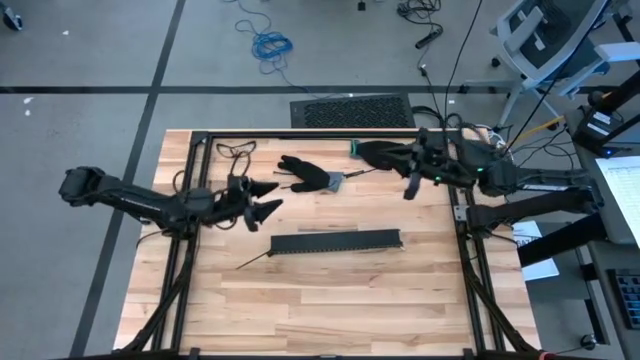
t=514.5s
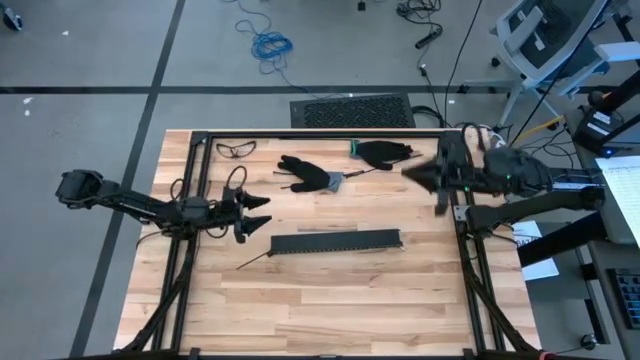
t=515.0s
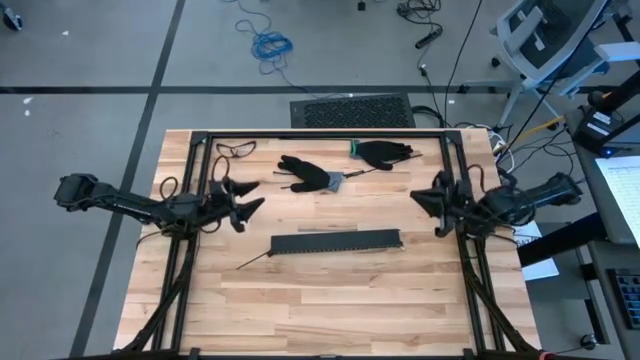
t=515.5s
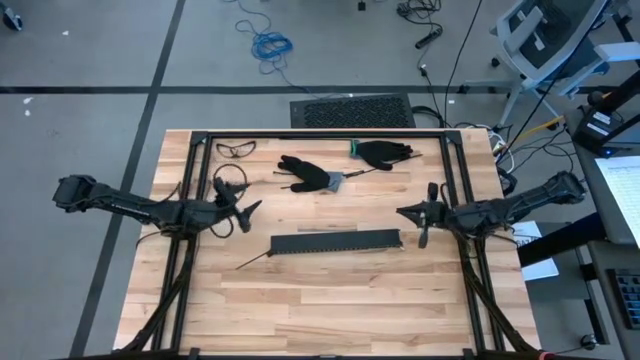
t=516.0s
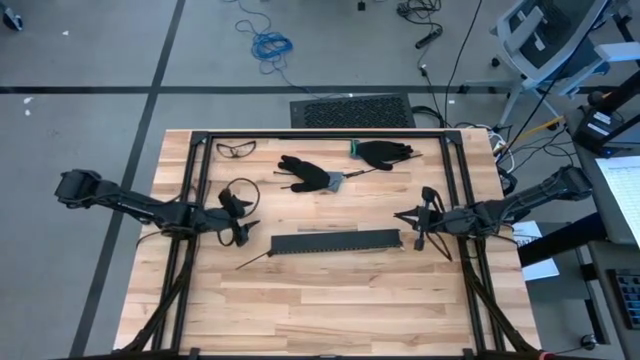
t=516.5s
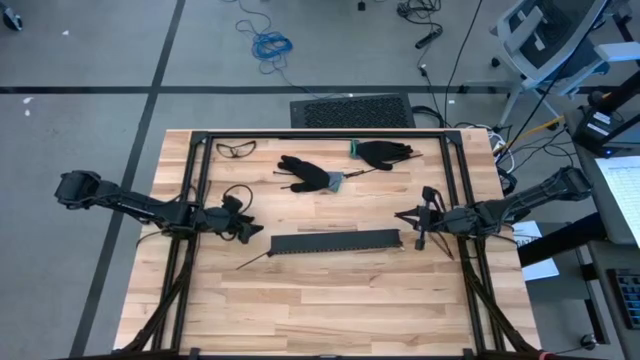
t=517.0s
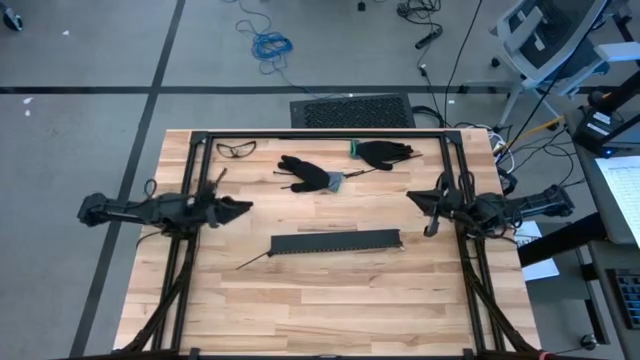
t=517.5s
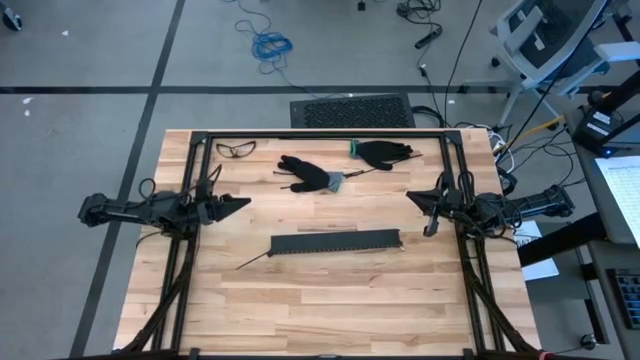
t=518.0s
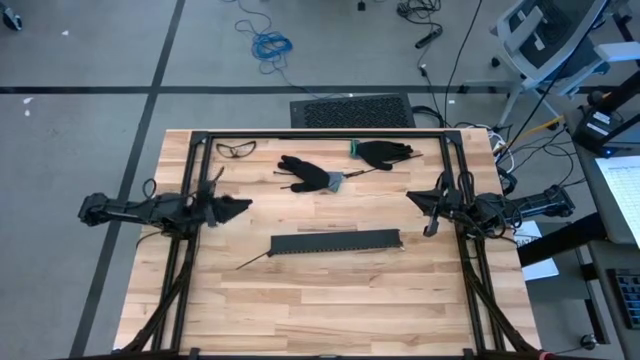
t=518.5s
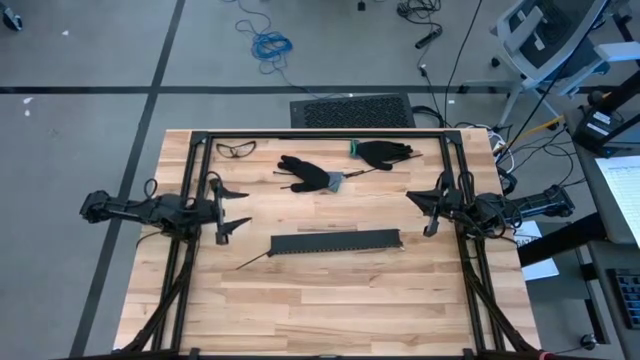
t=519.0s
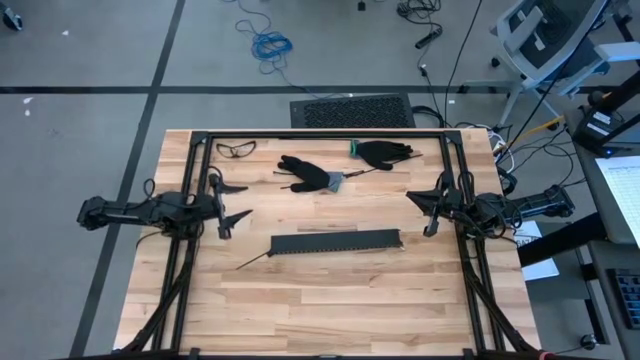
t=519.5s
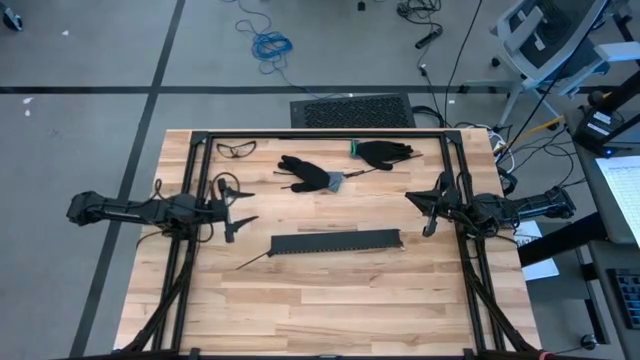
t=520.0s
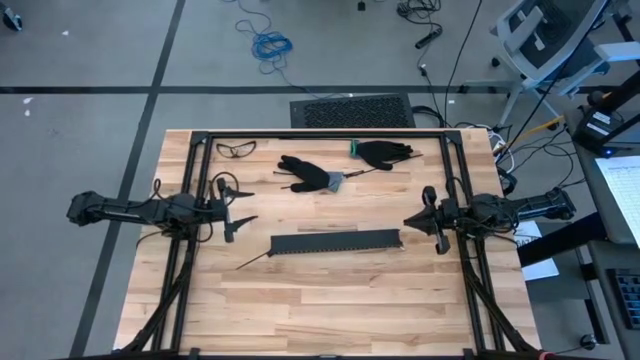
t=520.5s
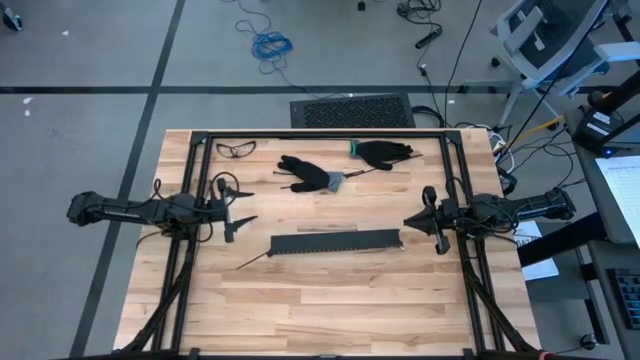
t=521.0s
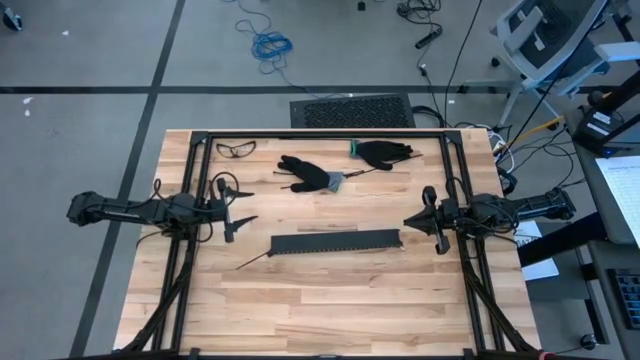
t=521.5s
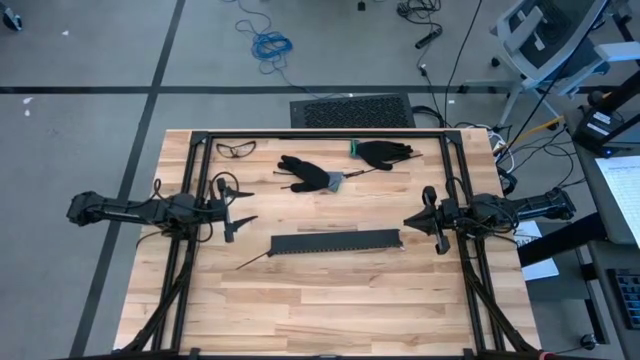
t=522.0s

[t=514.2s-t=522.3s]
Task: Ziptie cables
Return to Home Position

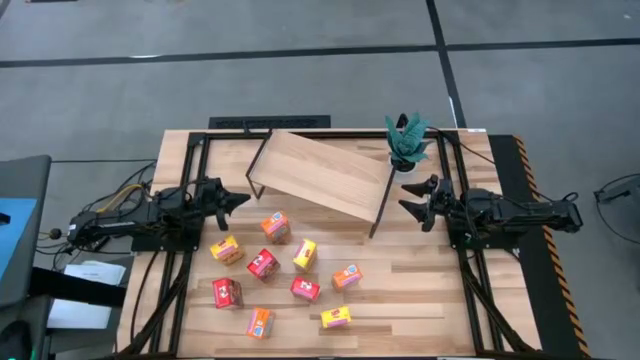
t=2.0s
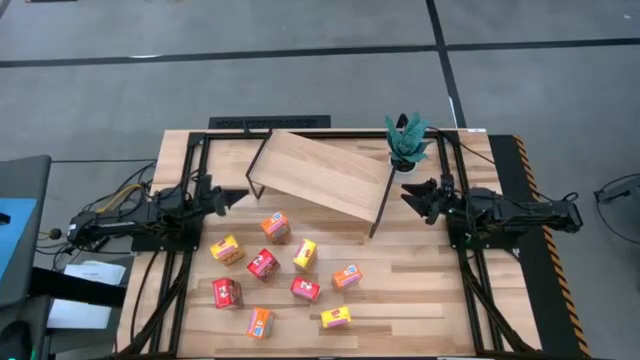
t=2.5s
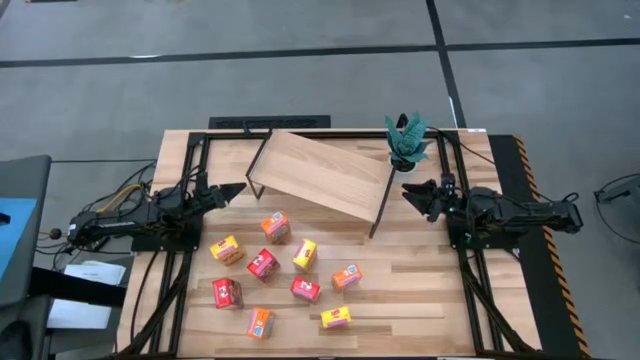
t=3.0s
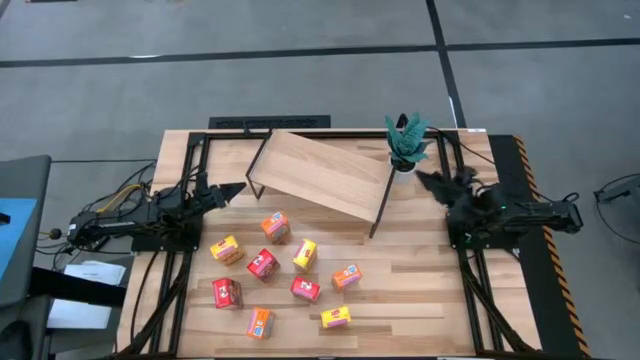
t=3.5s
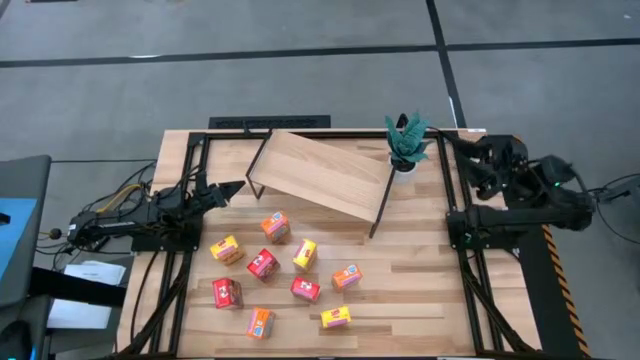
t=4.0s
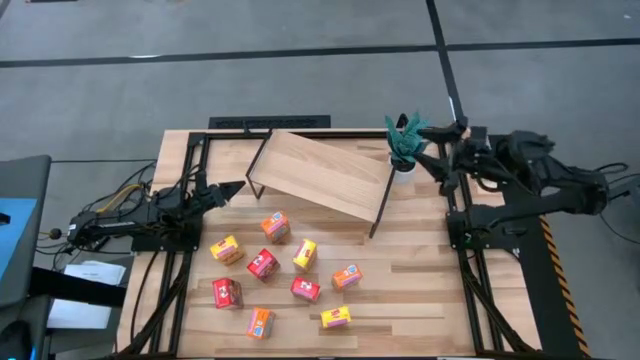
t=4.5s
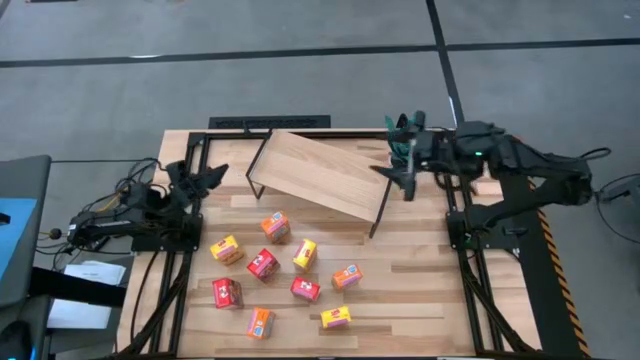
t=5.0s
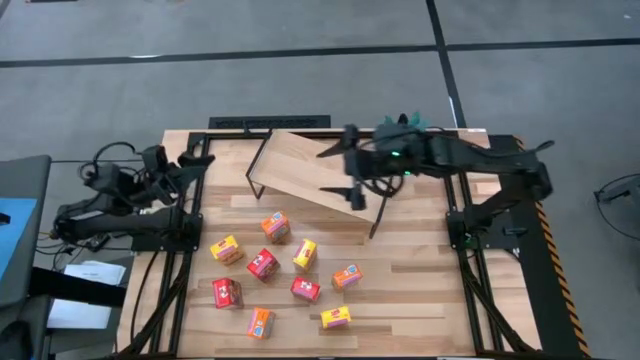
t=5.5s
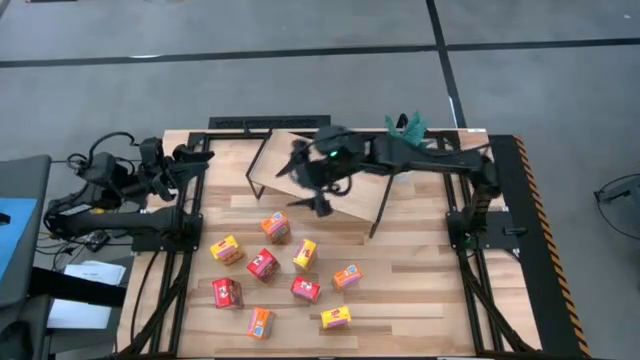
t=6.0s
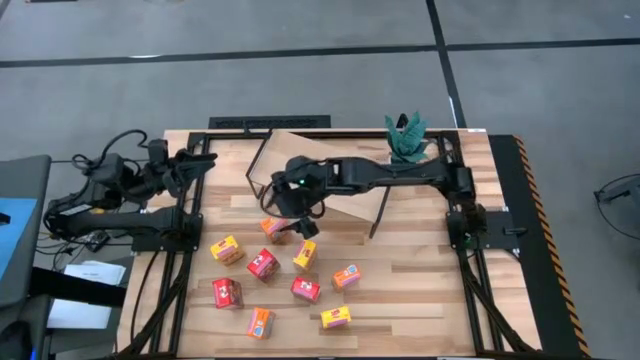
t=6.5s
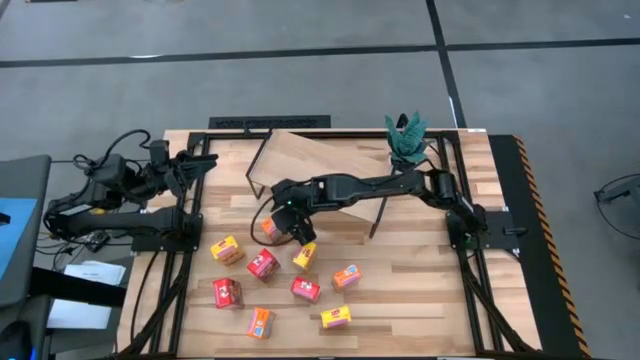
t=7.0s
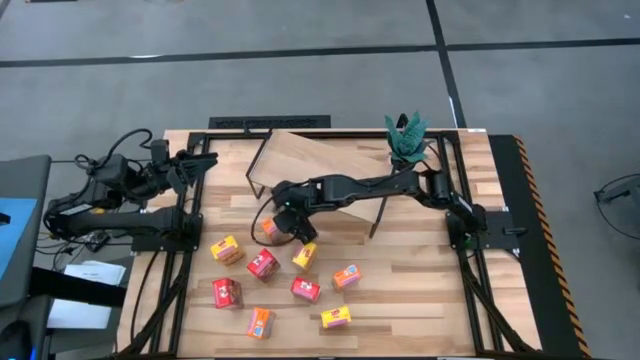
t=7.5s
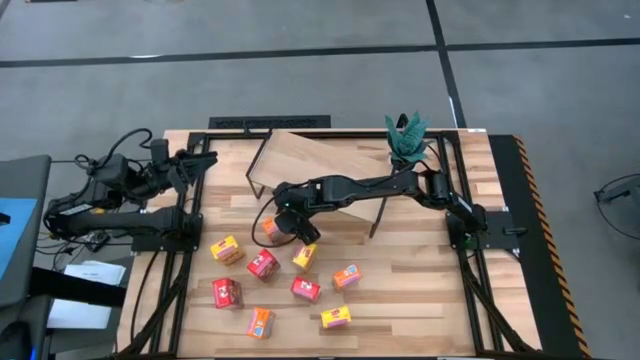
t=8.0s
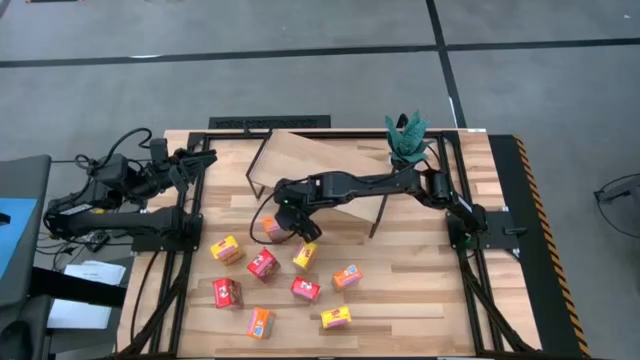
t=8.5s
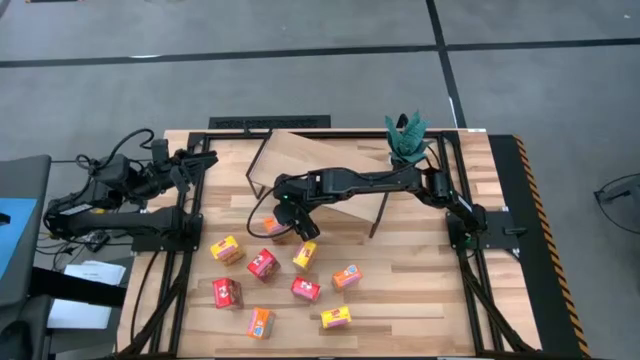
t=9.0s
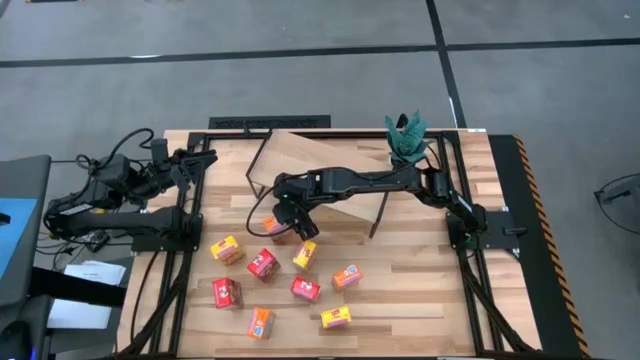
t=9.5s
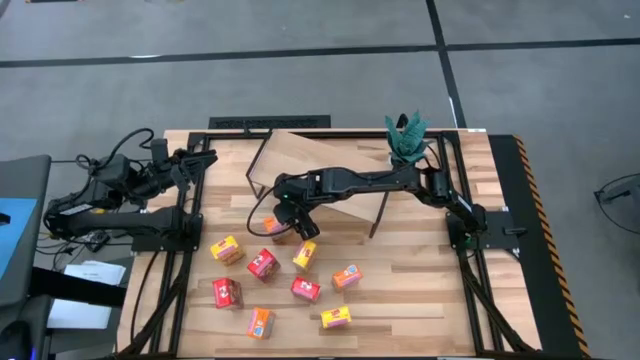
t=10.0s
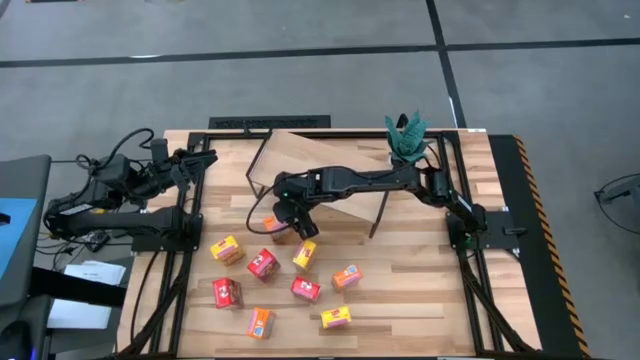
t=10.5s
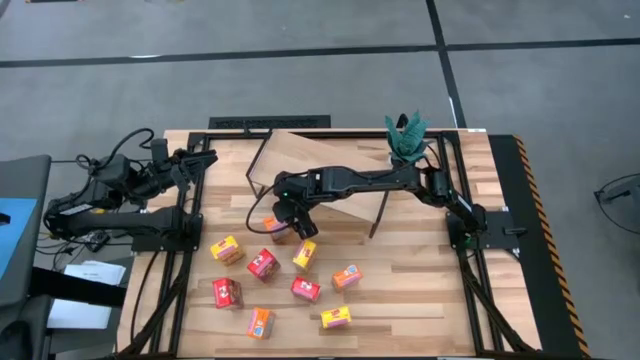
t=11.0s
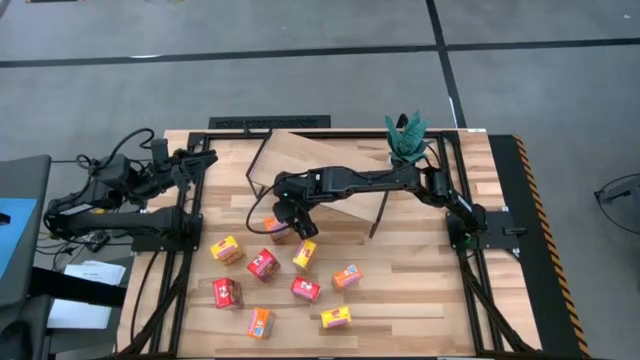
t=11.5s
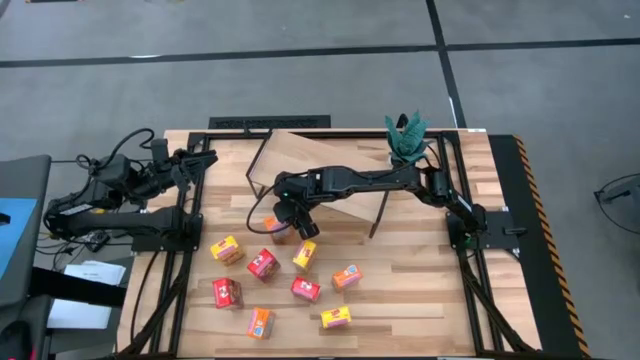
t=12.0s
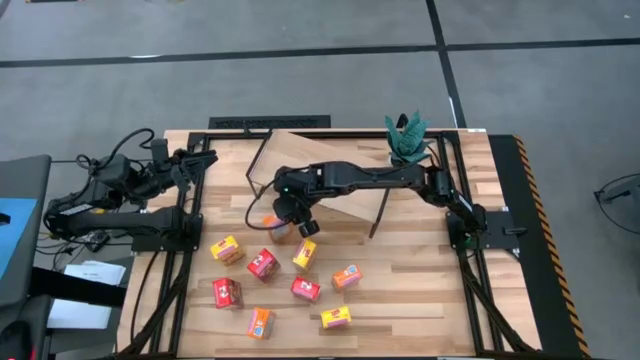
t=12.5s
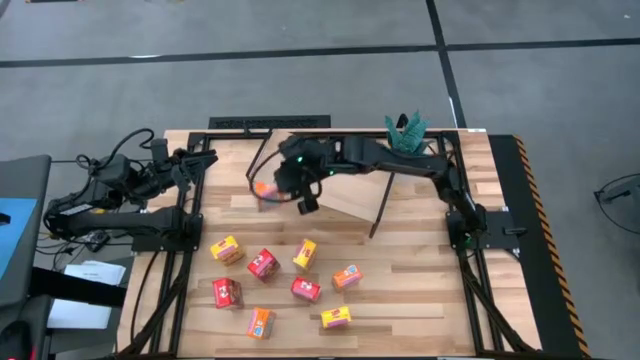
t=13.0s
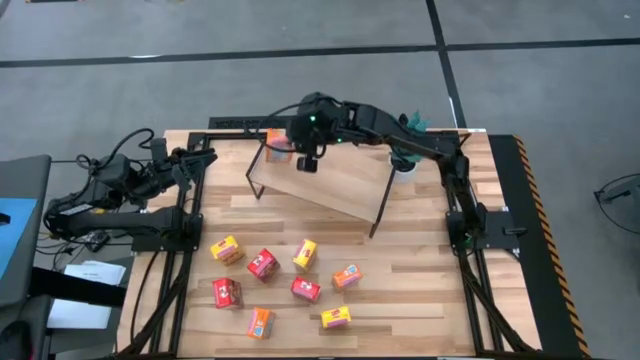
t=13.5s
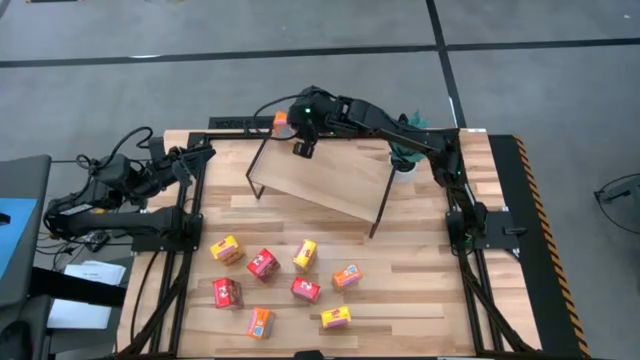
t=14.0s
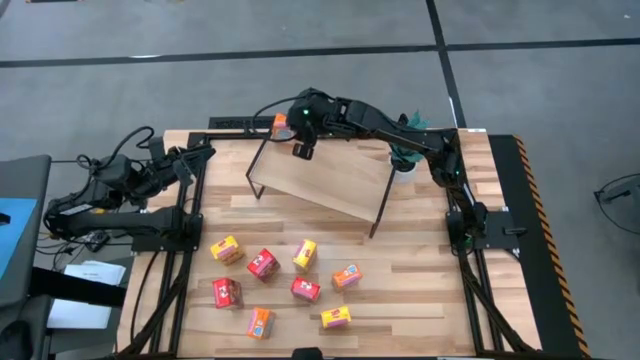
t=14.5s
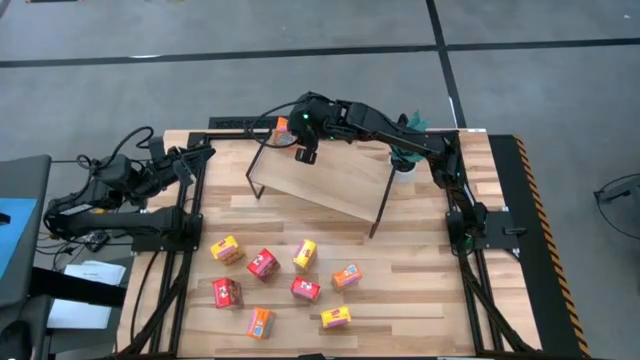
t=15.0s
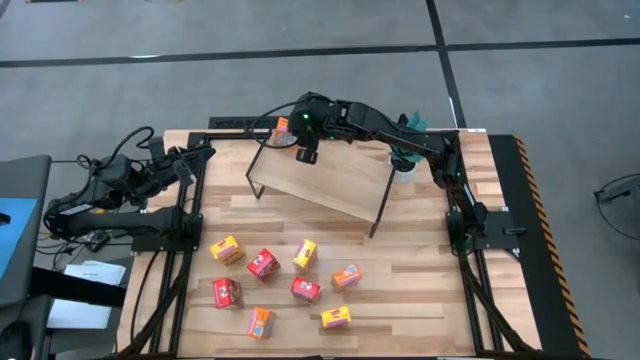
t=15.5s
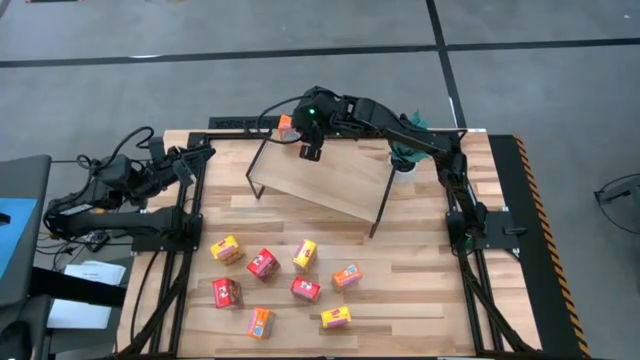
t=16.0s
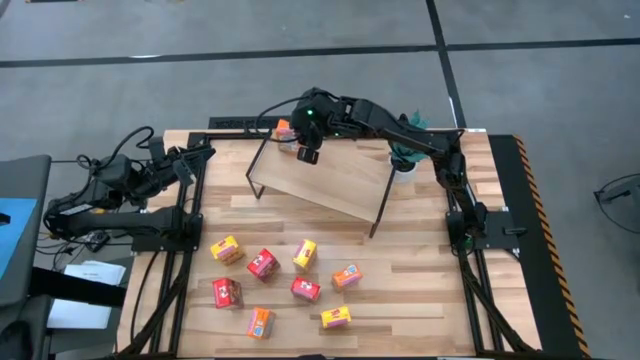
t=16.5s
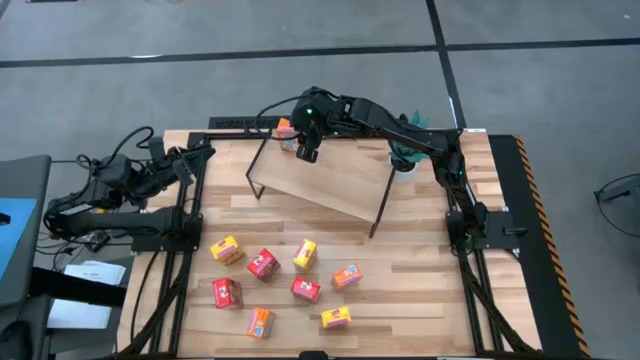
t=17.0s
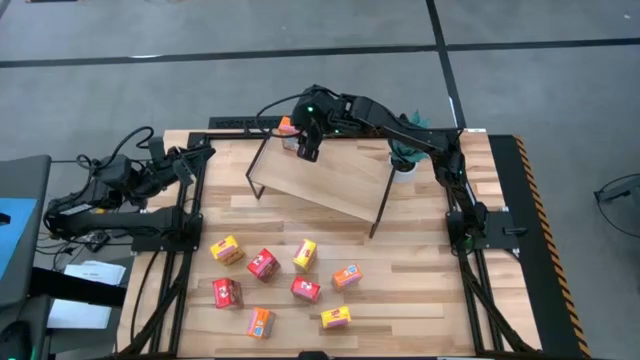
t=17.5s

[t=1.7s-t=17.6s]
Task: Stack cereal on shelf
Put the top orange cereal box on the shelf
